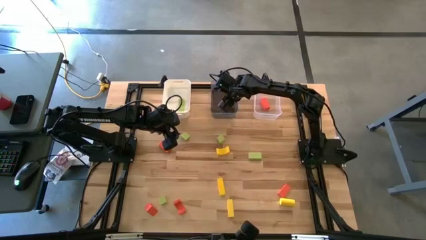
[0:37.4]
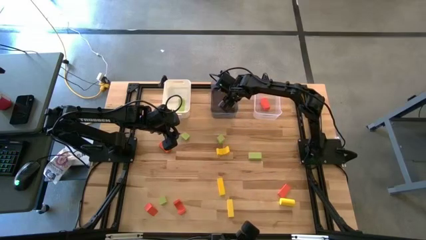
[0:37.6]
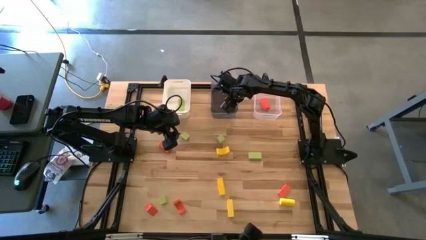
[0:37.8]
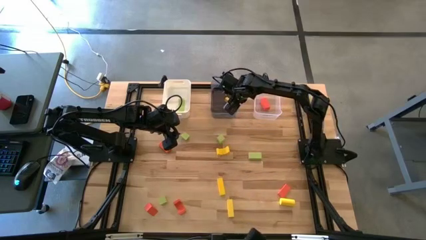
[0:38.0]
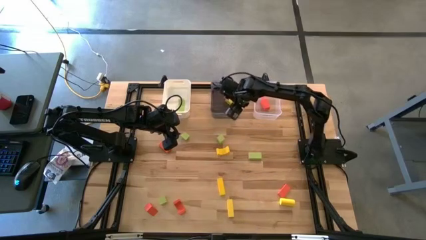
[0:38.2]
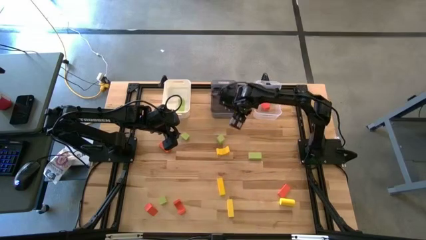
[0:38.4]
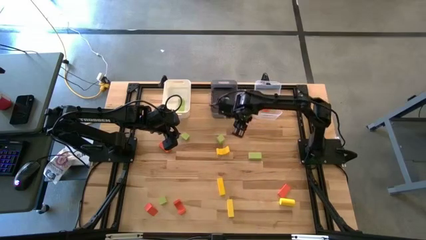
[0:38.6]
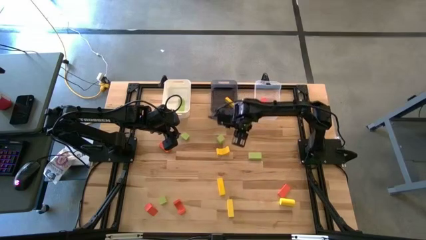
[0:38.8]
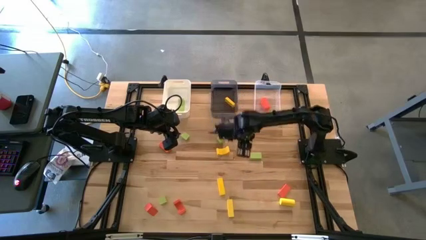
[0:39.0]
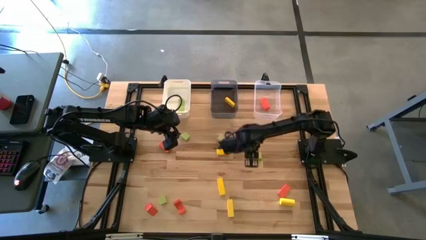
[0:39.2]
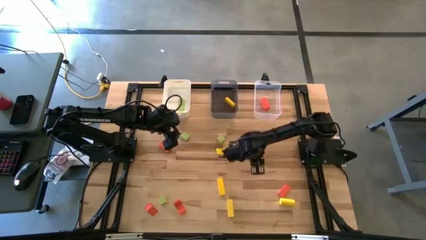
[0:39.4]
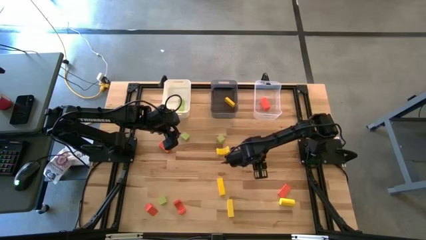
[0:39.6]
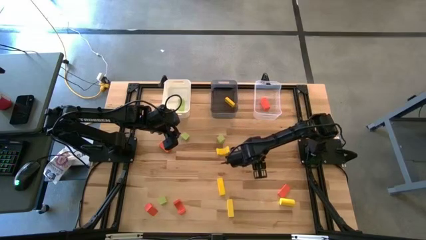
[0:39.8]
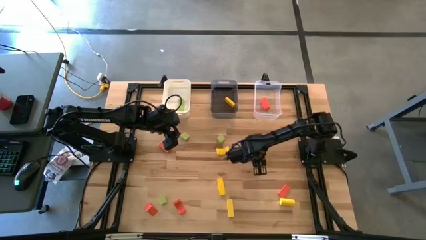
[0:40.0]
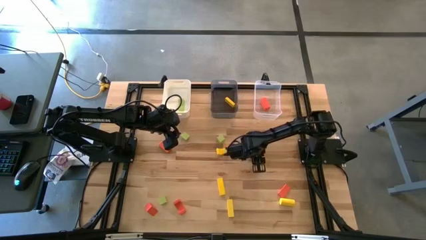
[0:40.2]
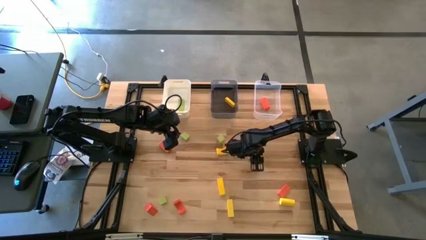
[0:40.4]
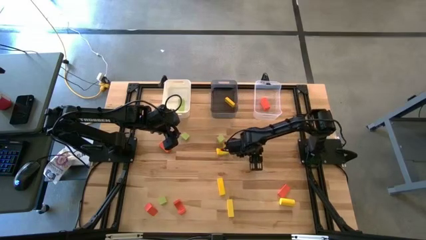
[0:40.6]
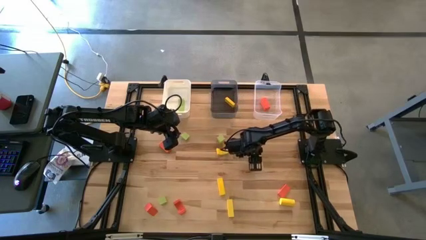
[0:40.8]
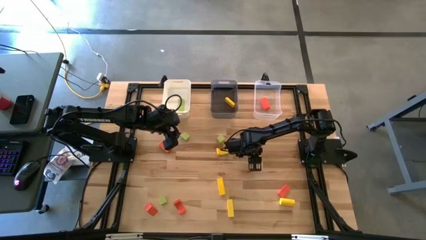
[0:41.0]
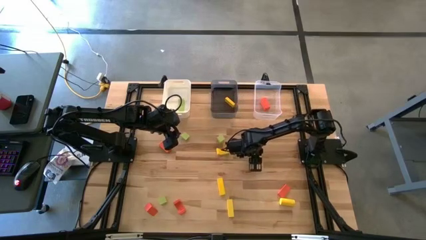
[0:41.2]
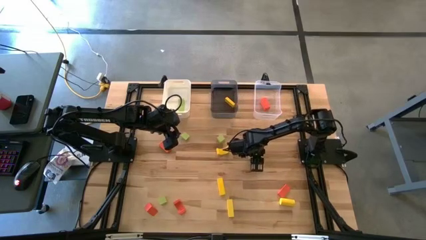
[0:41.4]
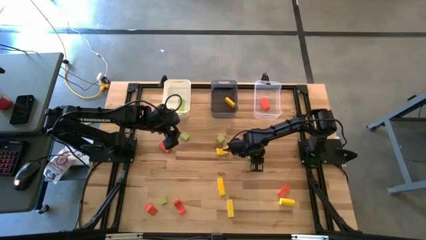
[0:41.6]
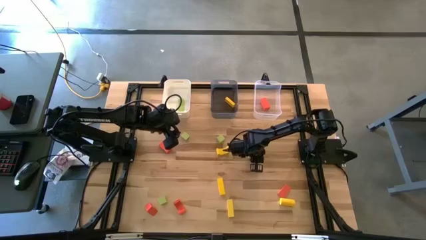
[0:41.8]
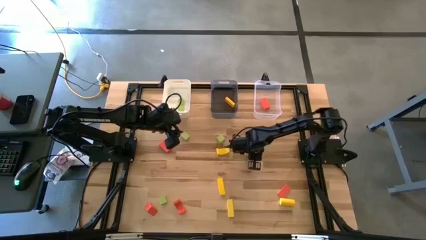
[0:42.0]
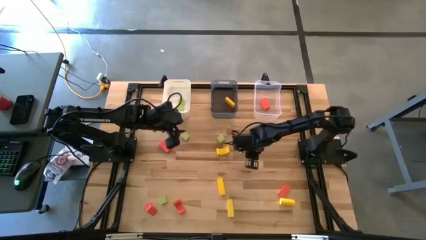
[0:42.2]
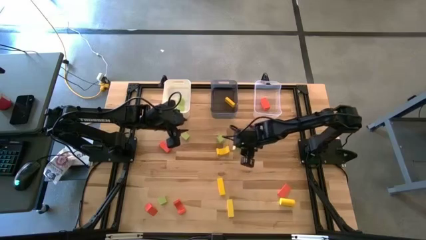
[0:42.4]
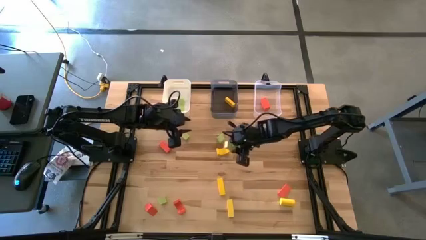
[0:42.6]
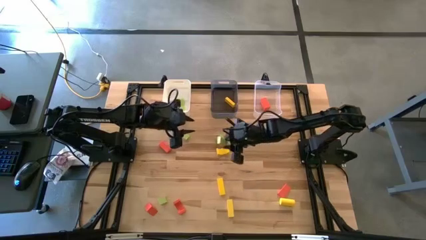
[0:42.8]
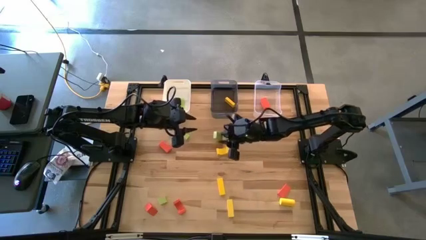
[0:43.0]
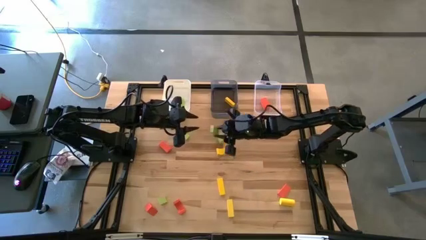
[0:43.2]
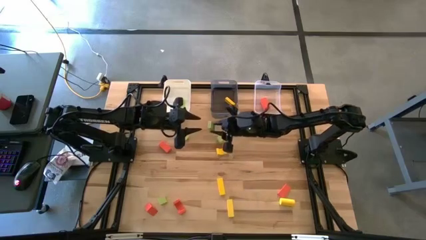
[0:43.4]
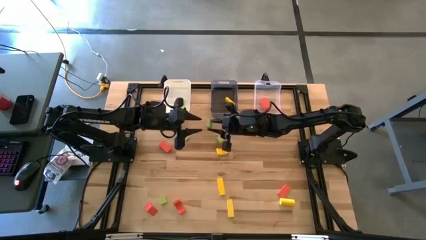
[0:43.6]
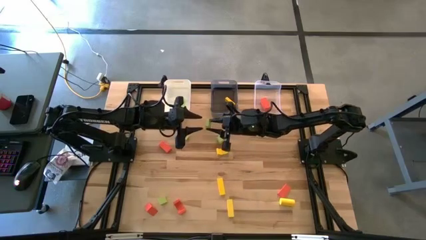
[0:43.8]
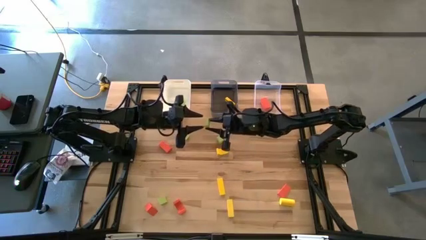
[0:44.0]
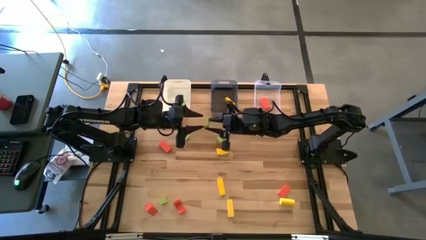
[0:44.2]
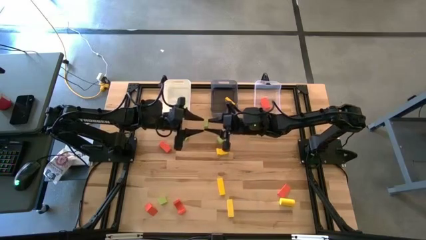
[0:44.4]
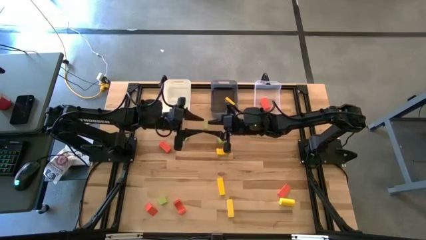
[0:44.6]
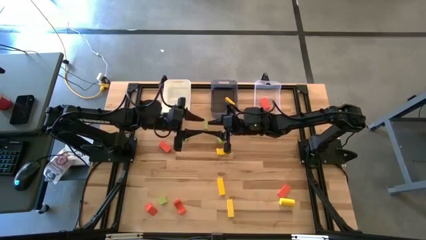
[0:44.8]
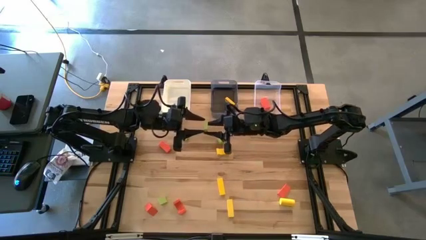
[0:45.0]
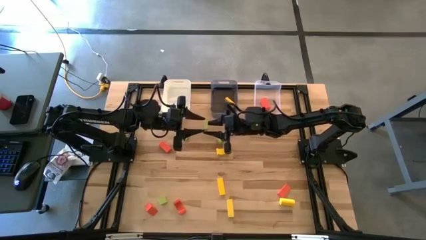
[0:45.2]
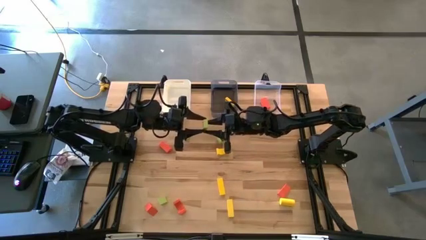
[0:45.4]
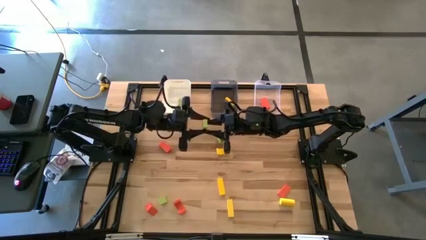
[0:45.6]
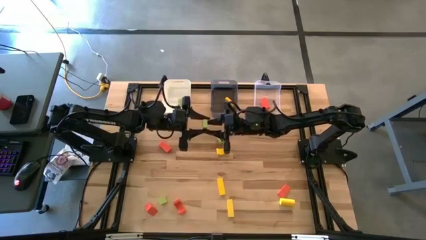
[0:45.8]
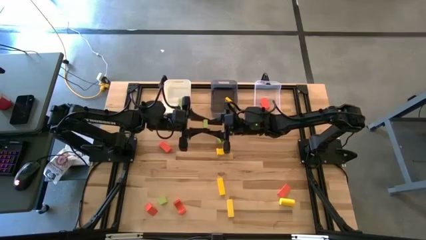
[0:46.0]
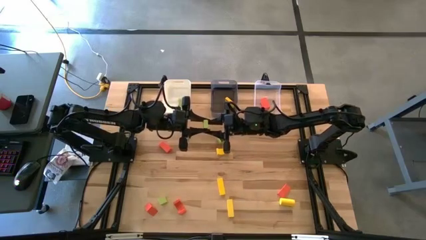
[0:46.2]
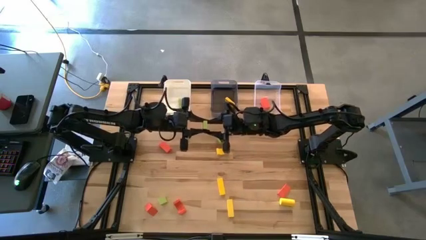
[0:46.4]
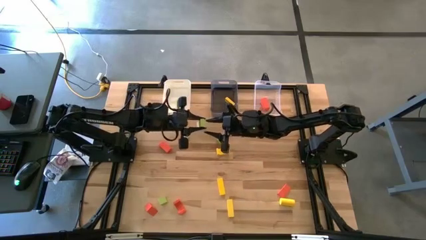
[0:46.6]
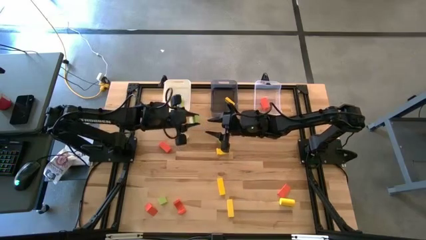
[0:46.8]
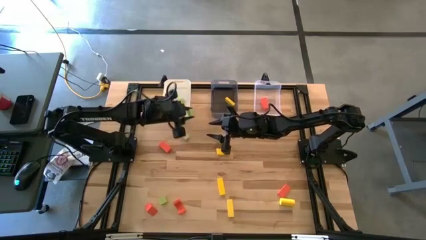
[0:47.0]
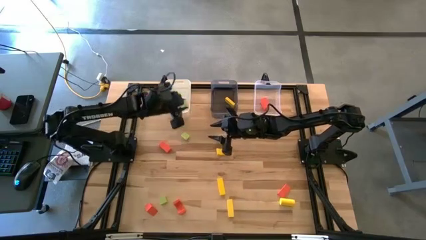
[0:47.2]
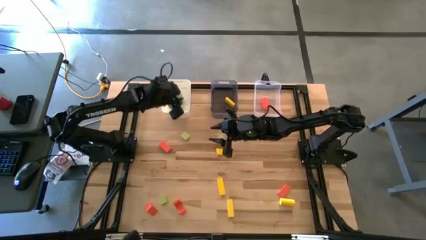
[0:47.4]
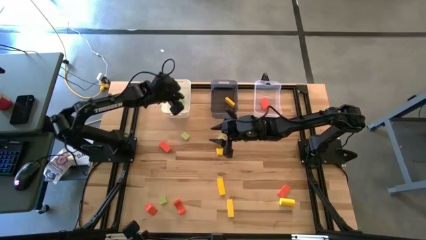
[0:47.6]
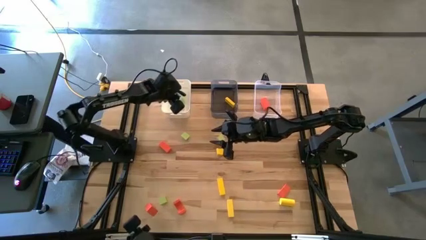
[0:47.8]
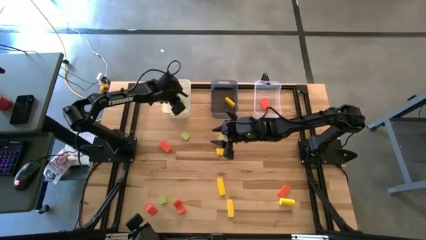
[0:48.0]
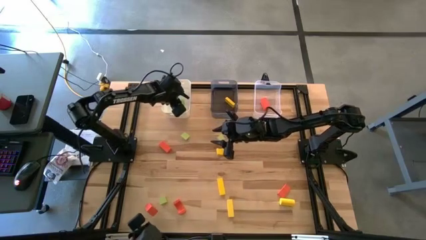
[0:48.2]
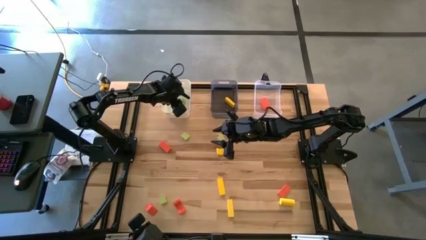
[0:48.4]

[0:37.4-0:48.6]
Task: Sort & place blocks by color
Put the green block into the white bin

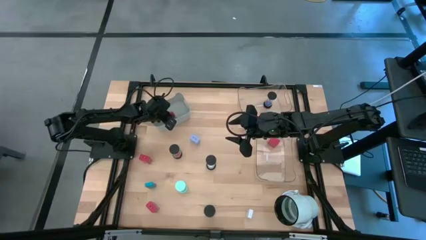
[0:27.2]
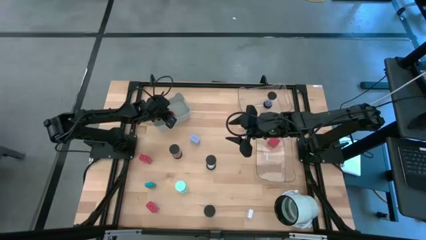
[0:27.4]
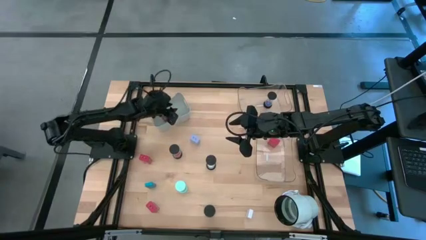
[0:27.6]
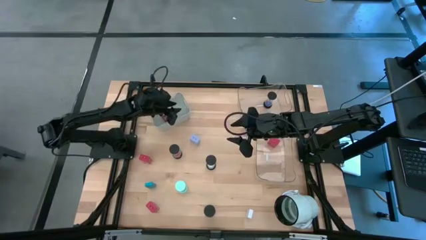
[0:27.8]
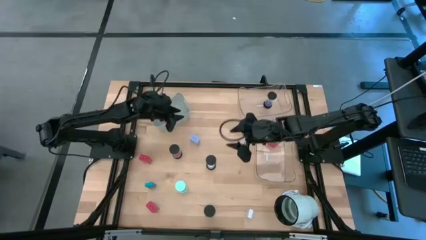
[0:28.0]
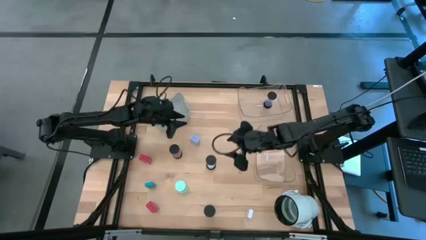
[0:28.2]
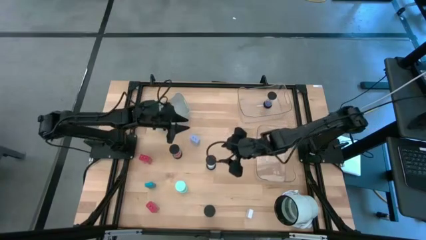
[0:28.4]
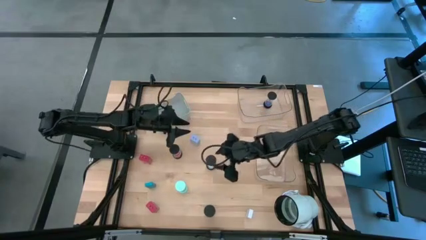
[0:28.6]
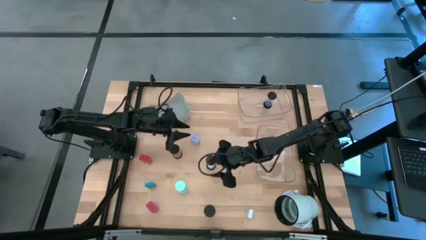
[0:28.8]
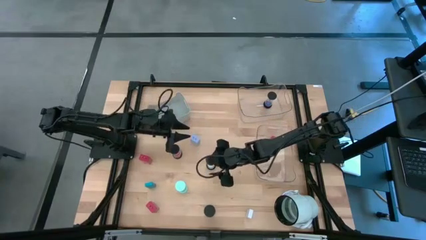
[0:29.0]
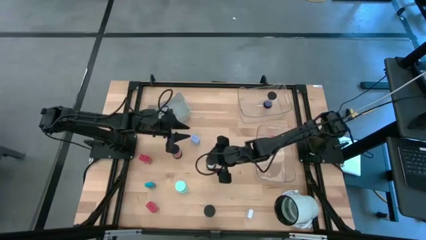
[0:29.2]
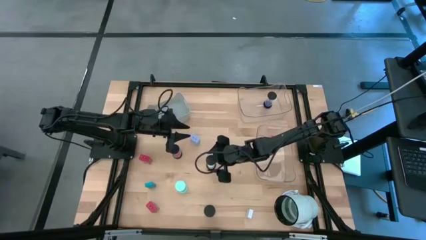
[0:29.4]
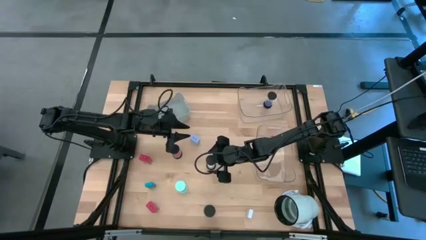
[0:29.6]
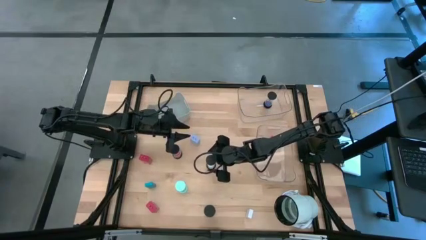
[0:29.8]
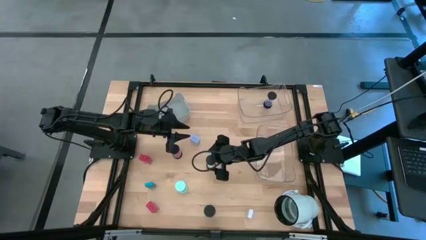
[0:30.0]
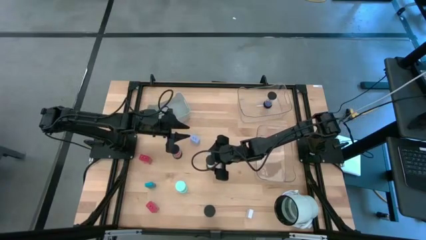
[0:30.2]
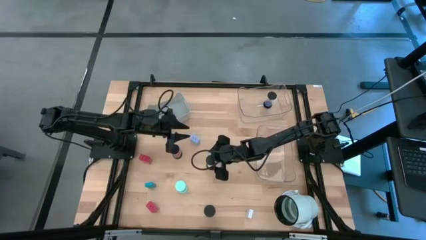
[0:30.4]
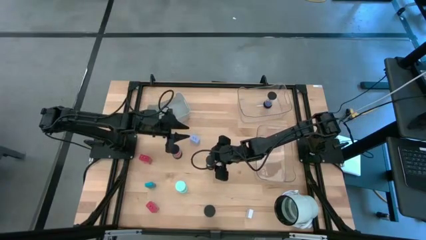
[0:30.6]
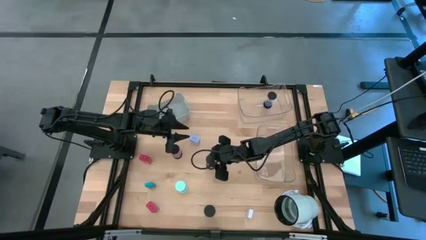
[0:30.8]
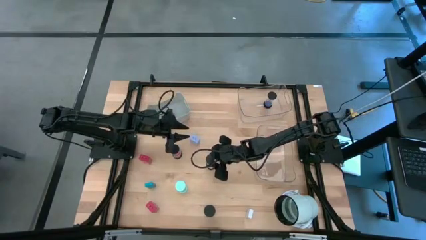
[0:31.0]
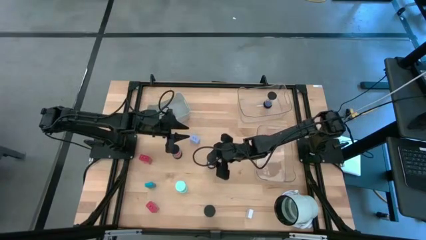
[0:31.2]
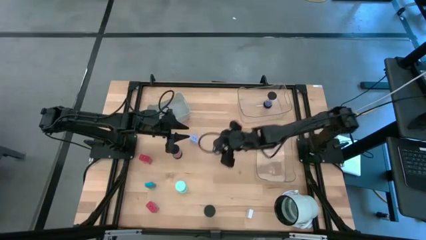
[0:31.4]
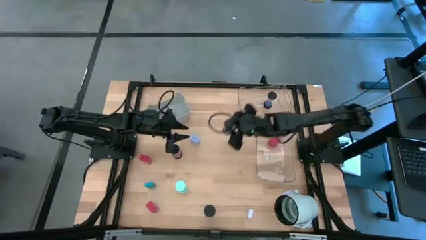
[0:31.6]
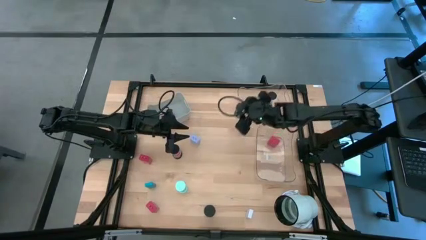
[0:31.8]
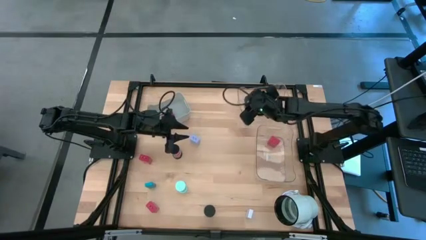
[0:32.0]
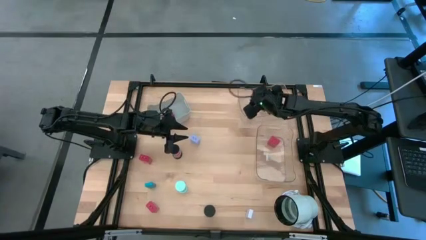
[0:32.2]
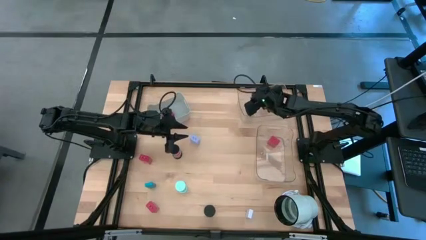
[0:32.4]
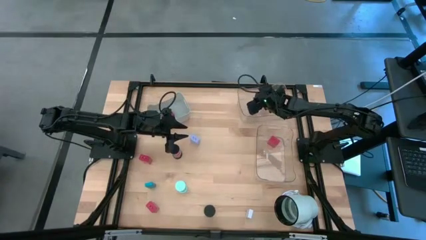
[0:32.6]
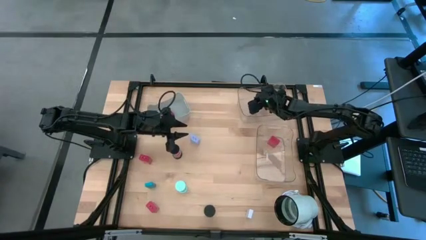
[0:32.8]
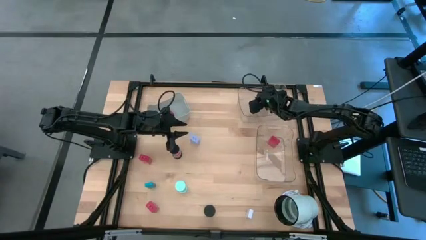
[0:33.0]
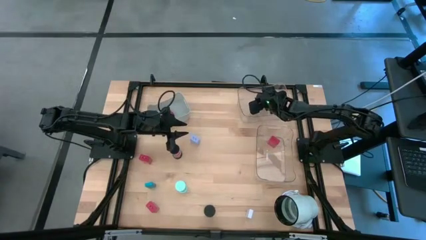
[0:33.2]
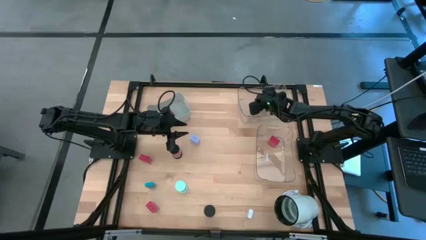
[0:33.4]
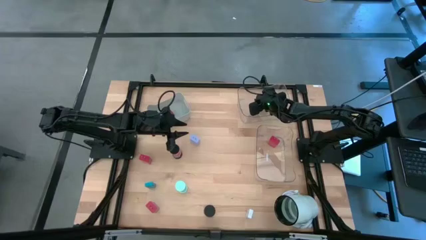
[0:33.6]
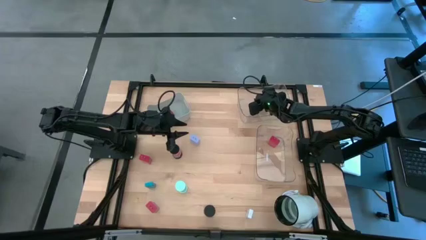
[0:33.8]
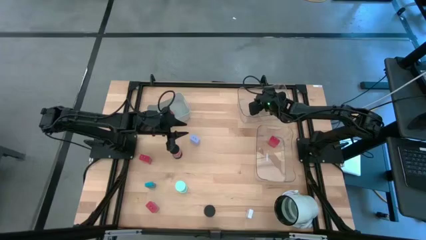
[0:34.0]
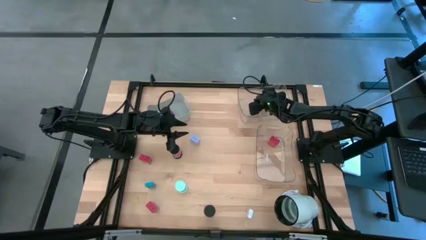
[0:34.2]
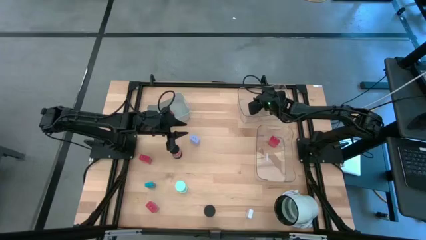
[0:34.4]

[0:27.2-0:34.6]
Task: Pick & Place Office items
Put the white hourglass into the top transparent bin
